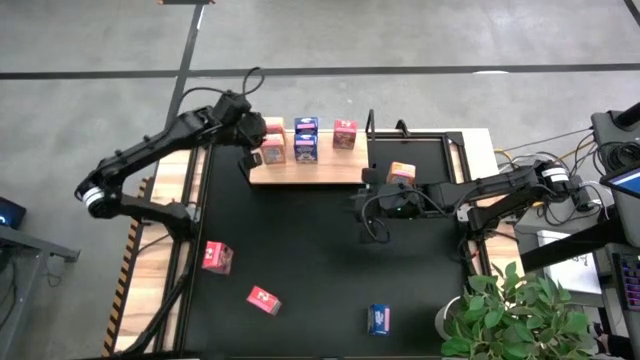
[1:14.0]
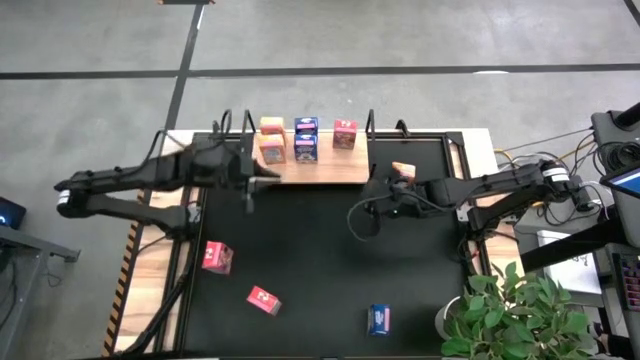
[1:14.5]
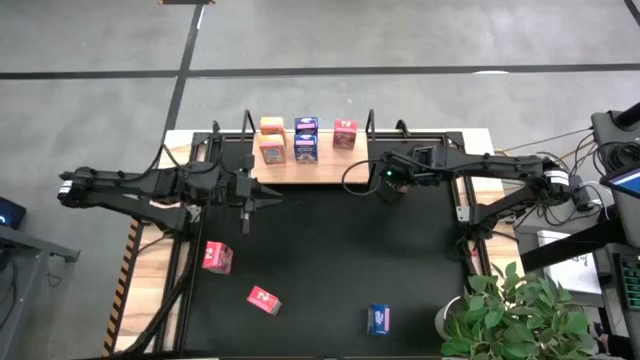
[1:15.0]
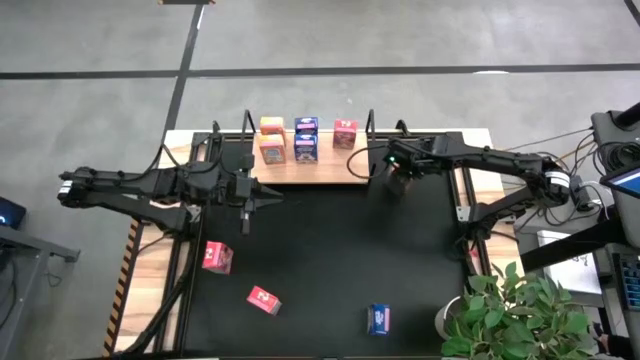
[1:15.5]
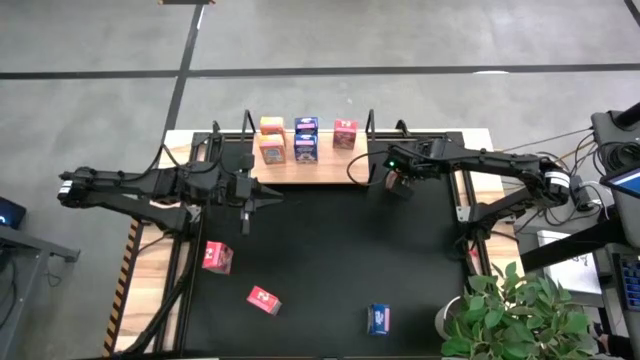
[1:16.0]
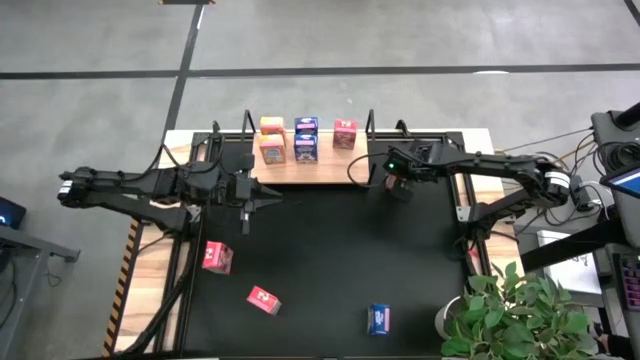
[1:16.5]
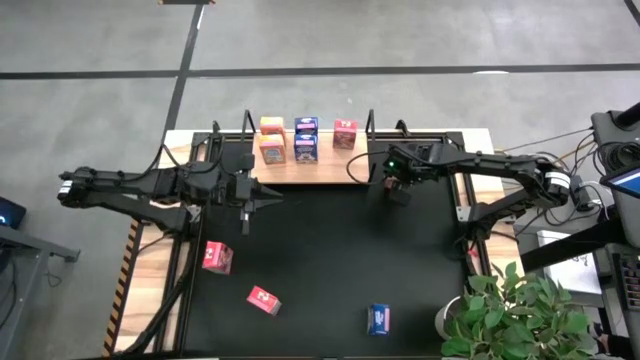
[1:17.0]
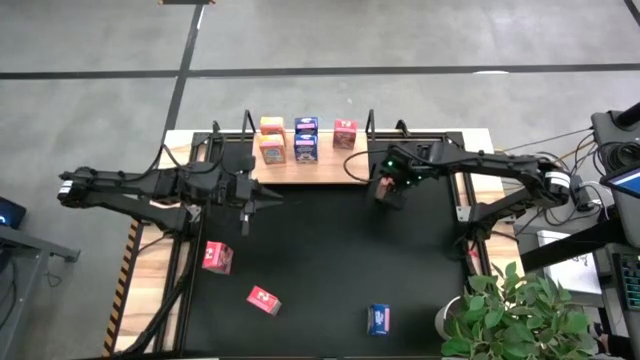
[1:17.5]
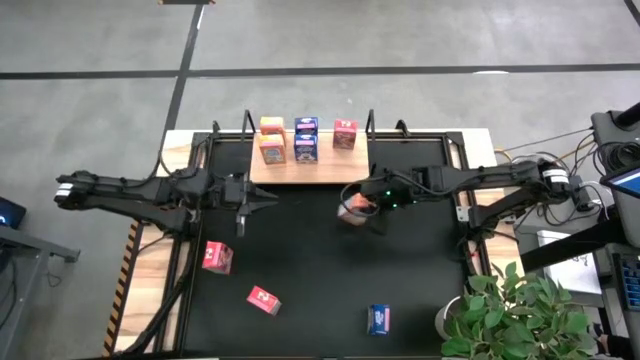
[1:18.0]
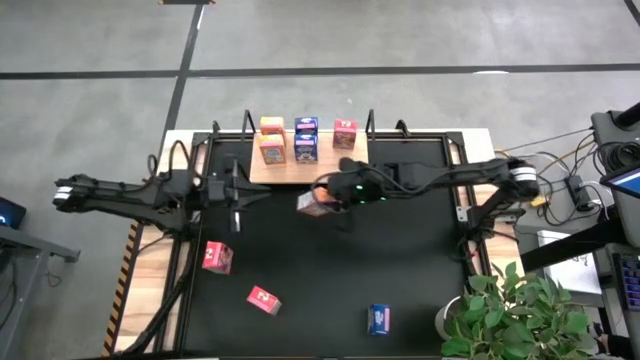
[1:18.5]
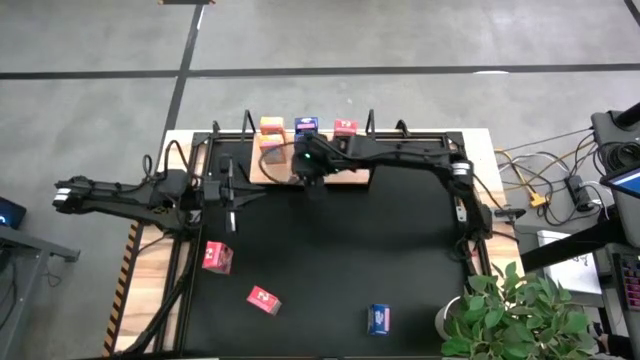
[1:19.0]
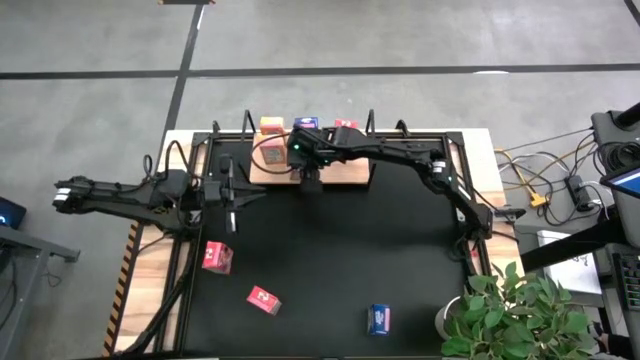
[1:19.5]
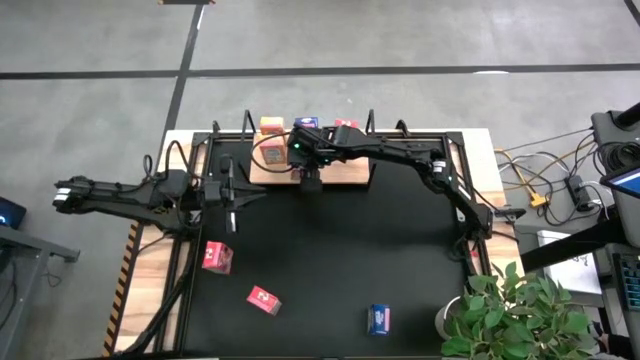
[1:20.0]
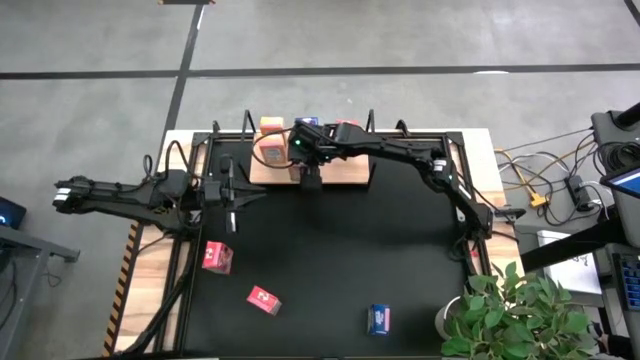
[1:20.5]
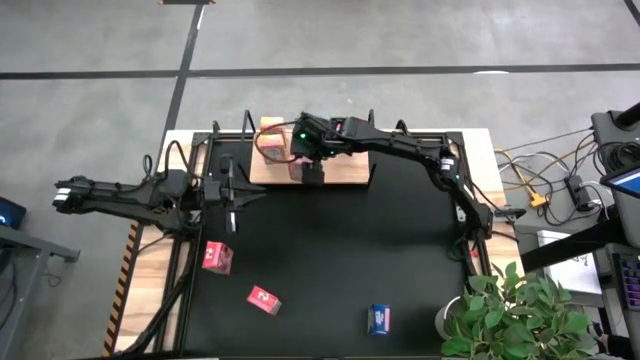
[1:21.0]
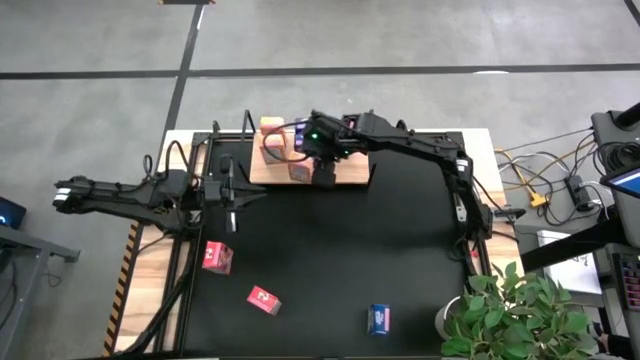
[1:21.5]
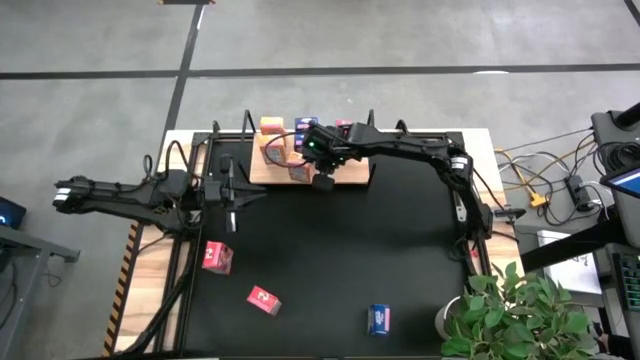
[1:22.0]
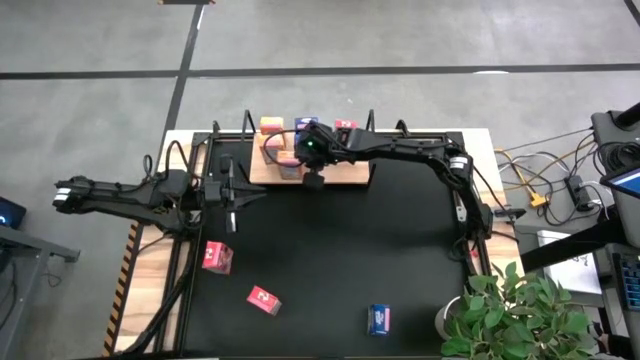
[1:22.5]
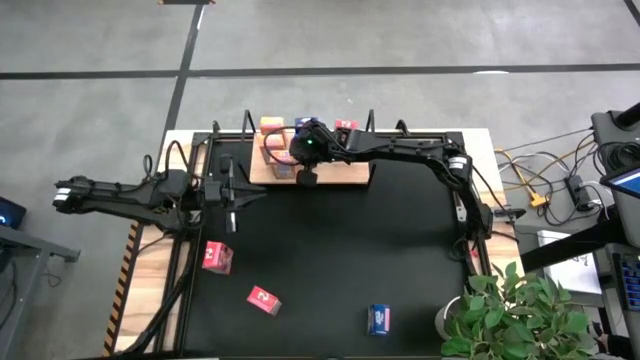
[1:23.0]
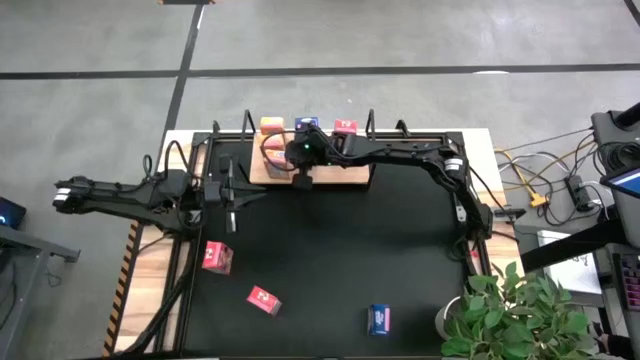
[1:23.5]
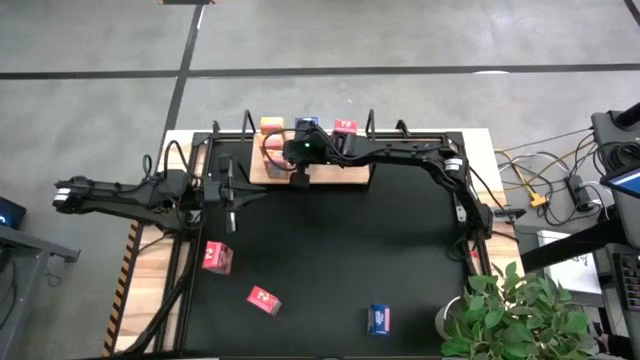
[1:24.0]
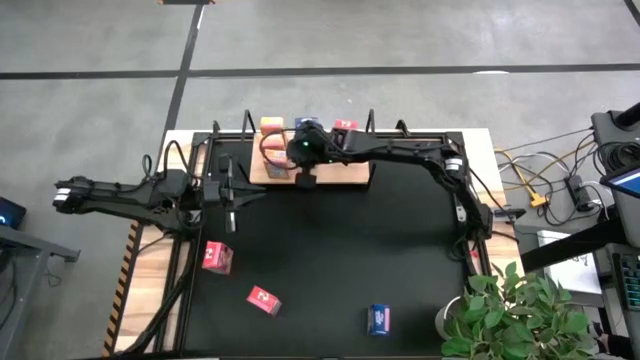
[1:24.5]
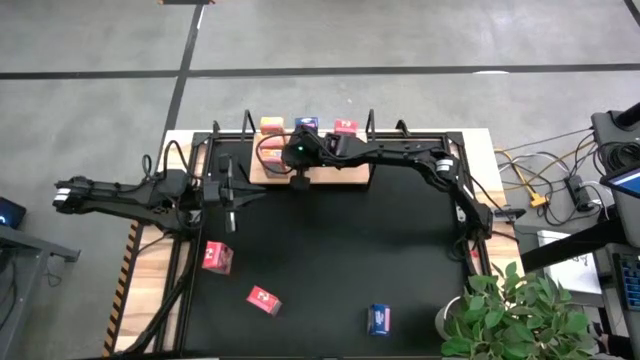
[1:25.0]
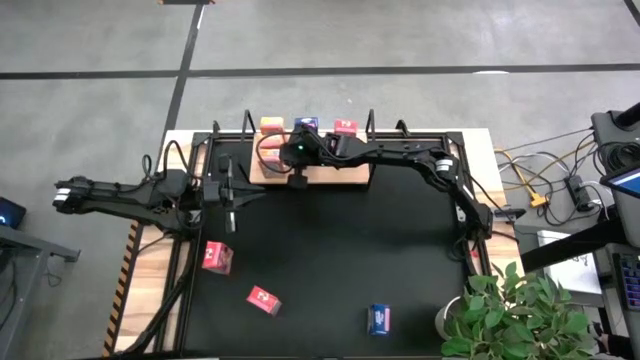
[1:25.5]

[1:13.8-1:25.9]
Task: Stack cereal on shelf
Put the orange cereal box on the shelf aligned with other orange cereal boxes

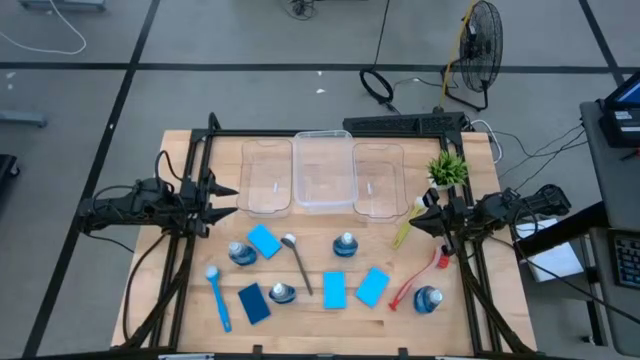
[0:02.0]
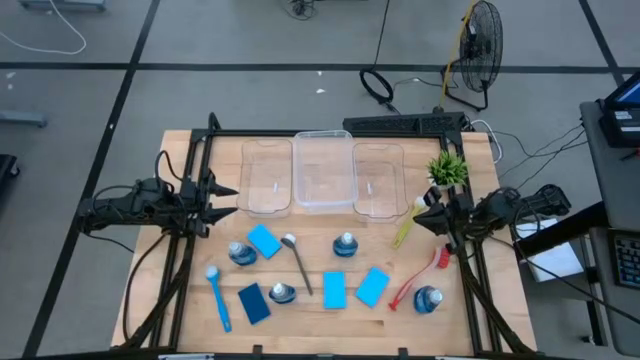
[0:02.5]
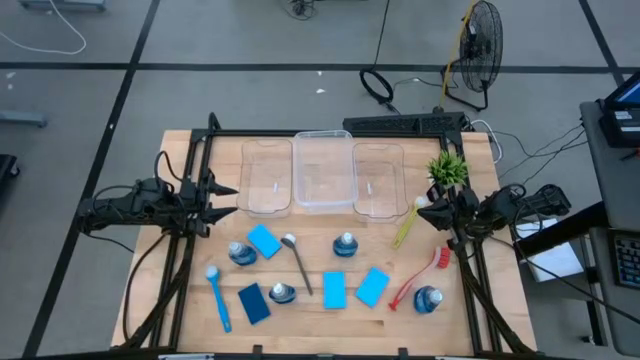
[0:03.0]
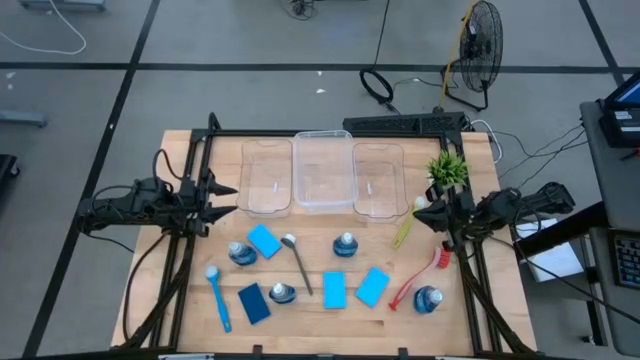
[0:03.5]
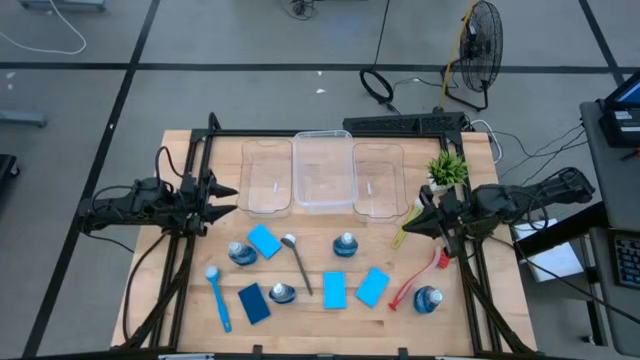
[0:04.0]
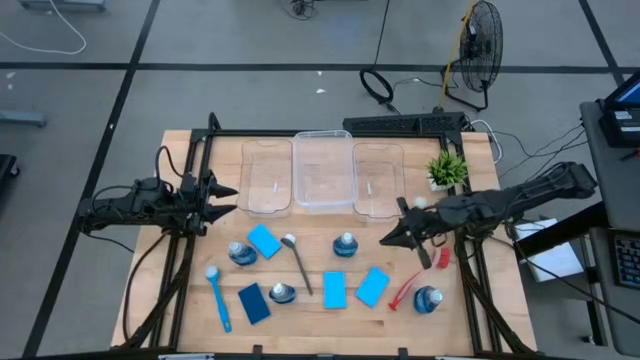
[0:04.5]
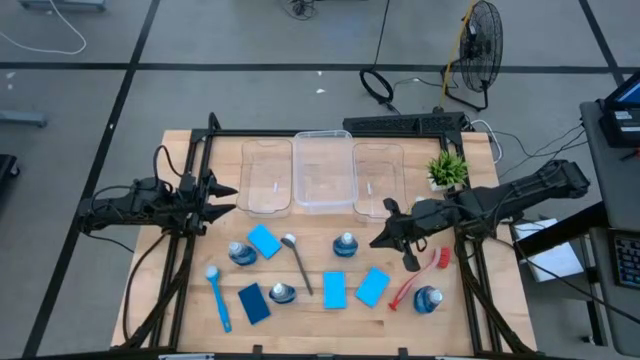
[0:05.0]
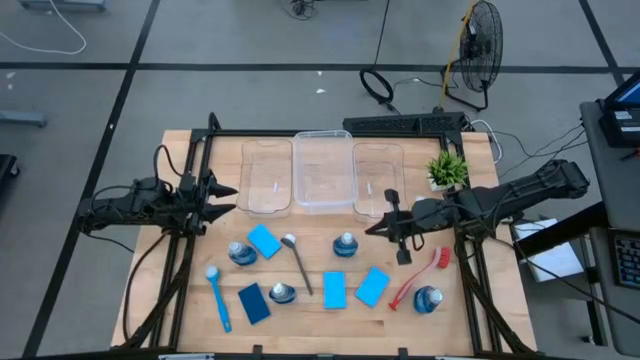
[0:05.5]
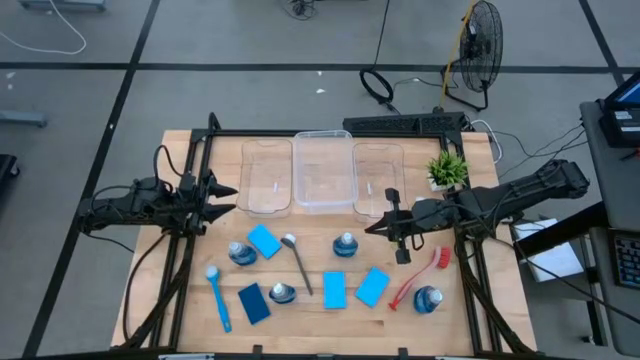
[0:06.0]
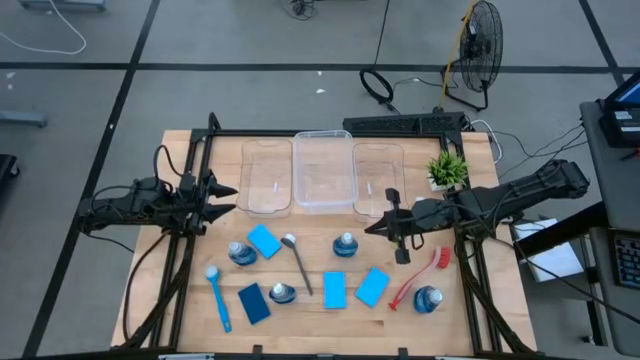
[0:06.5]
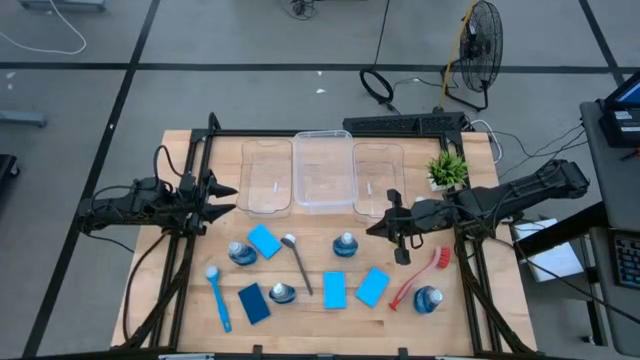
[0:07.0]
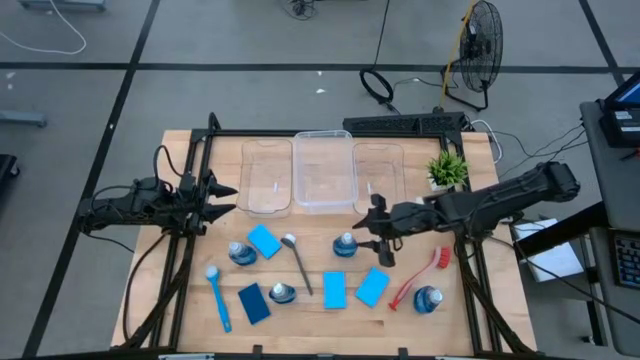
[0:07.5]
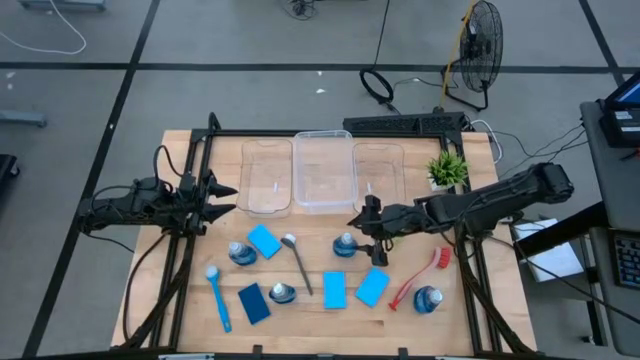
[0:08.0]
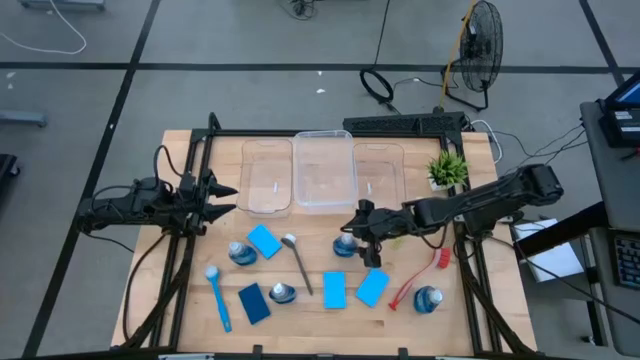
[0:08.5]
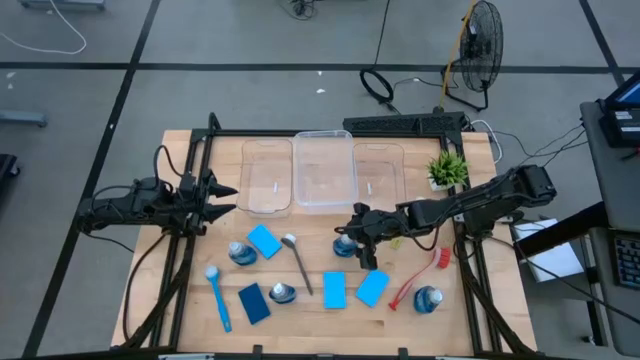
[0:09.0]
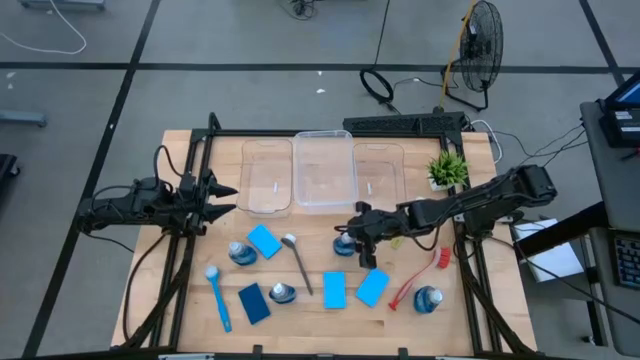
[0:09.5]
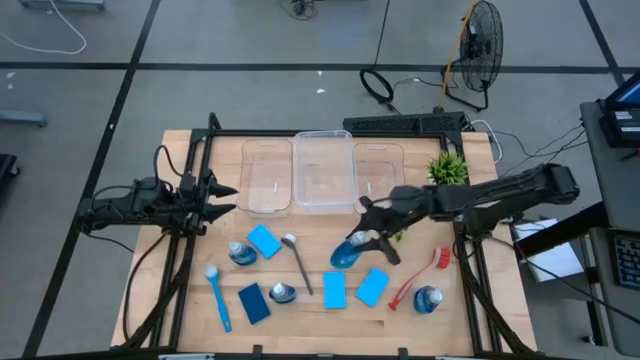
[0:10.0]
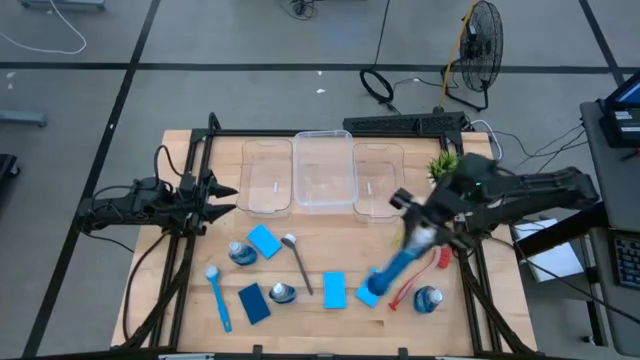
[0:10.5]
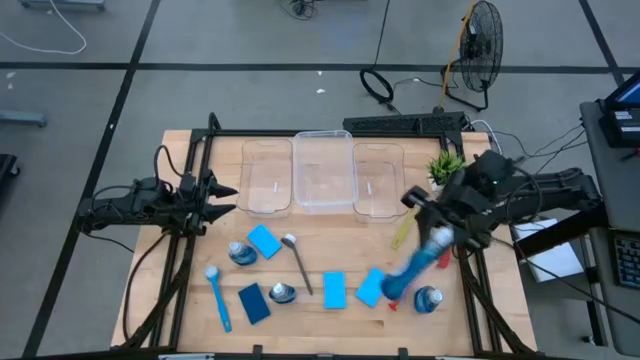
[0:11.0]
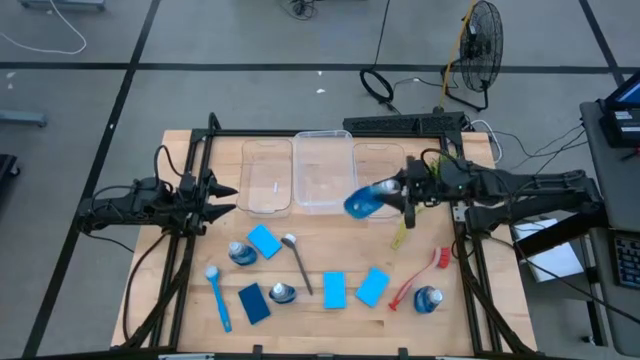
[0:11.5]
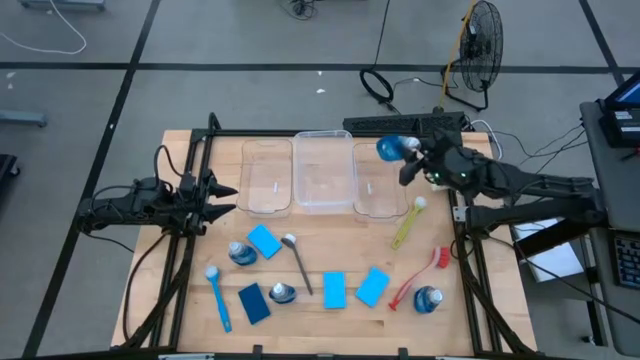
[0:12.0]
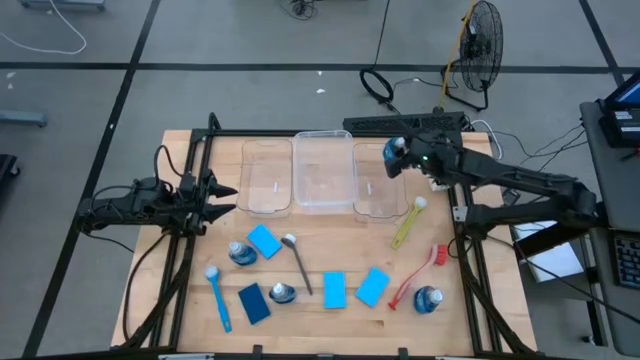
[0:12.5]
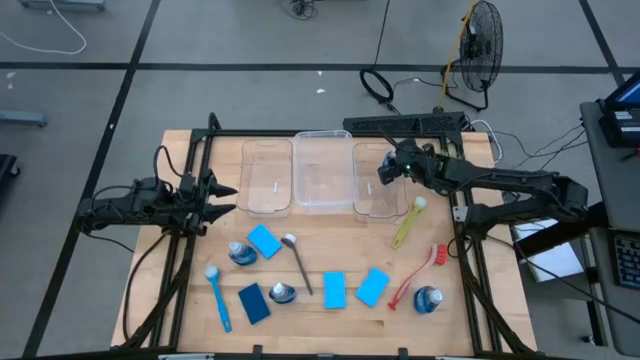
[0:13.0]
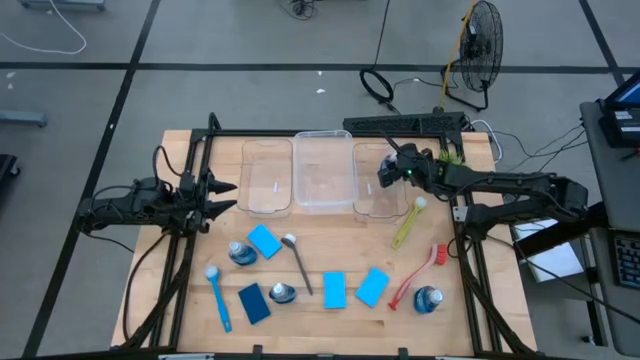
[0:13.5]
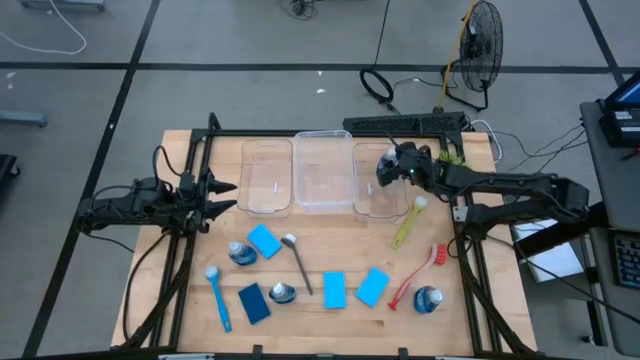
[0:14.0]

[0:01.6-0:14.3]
Task: Pick & Place Kitchen Sink Supplies
Put the blue dishwashing liquid bottle into the right transparent bin
